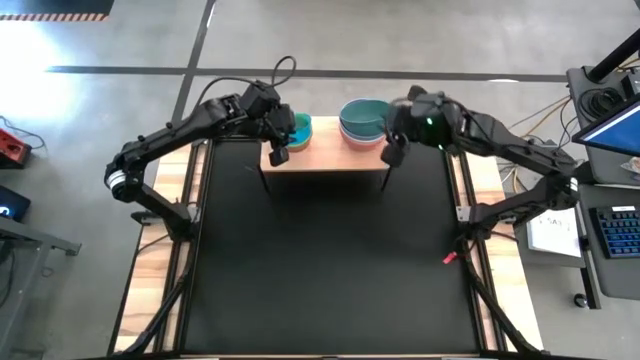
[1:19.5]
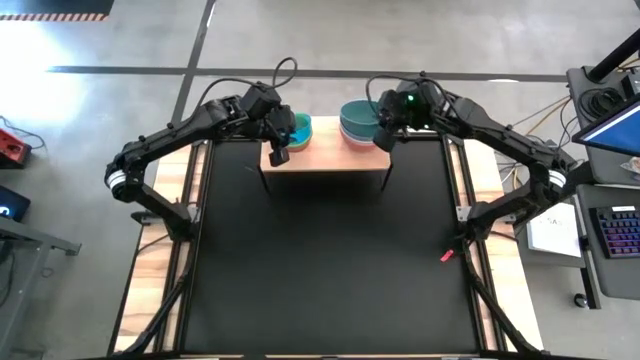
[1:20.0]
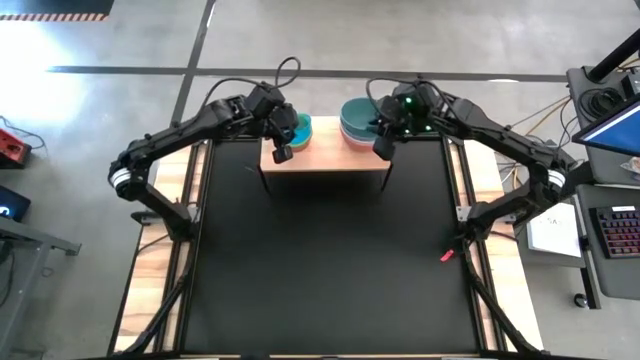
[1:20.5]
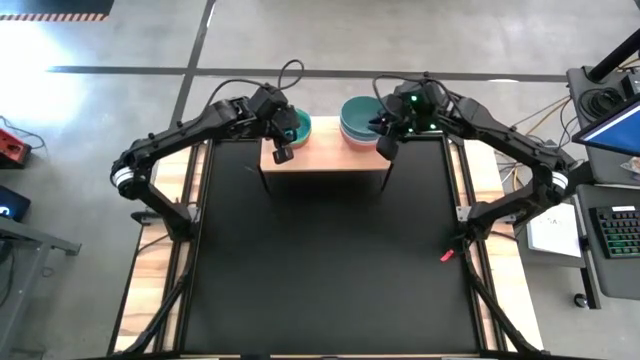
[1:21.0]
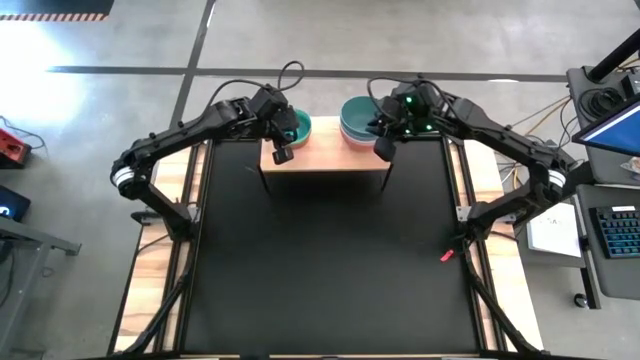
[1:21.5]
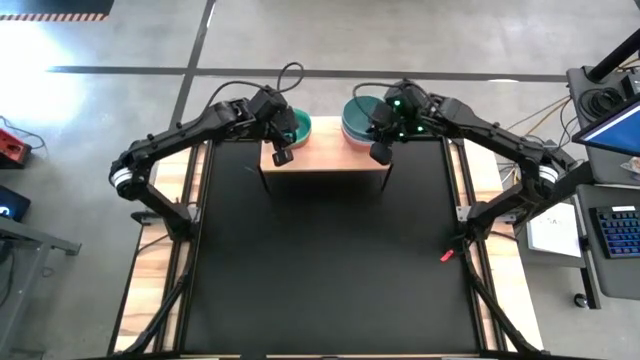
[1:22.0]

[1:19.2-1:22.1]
Task: Place and stack bowls onto a shelf
Adjust the green bowl on the shelf

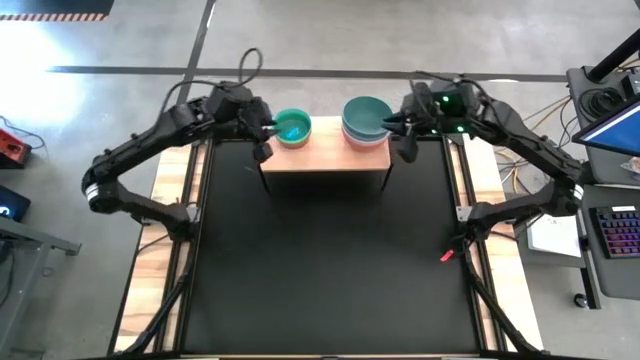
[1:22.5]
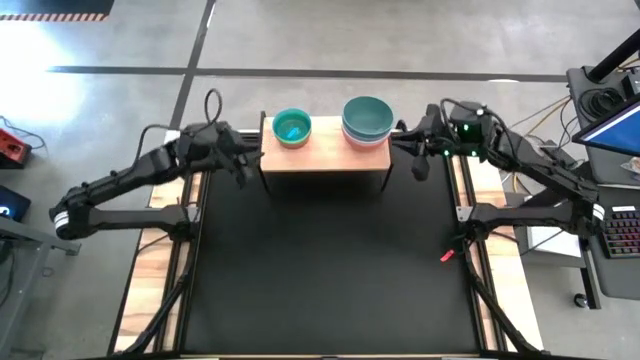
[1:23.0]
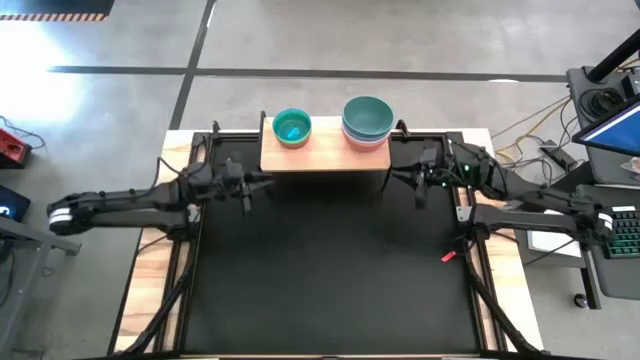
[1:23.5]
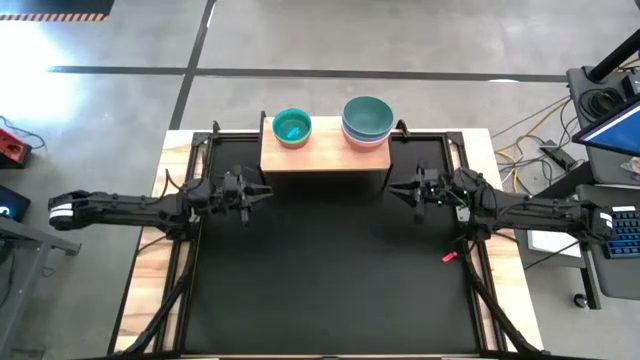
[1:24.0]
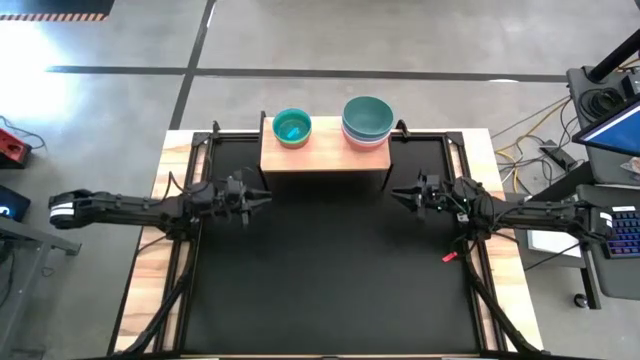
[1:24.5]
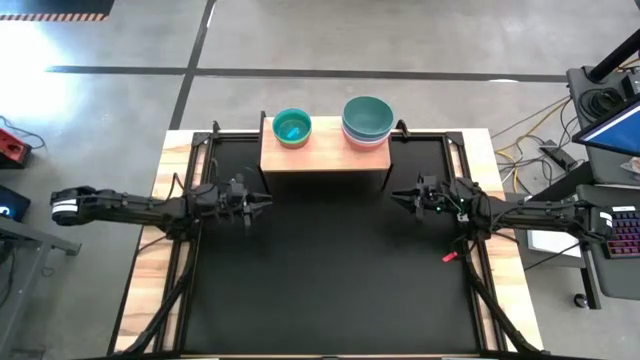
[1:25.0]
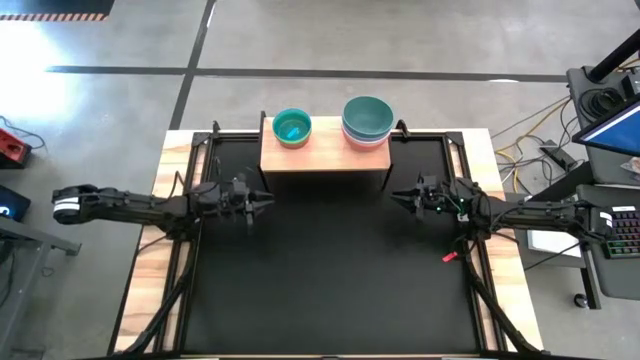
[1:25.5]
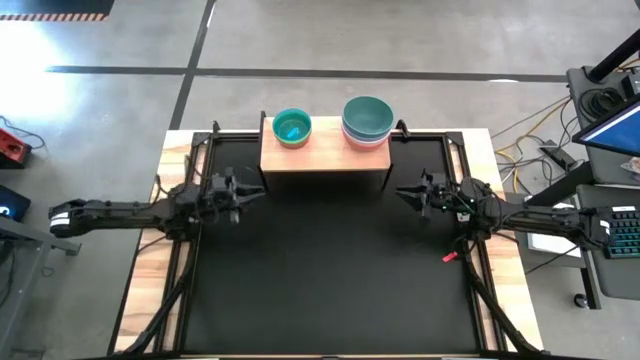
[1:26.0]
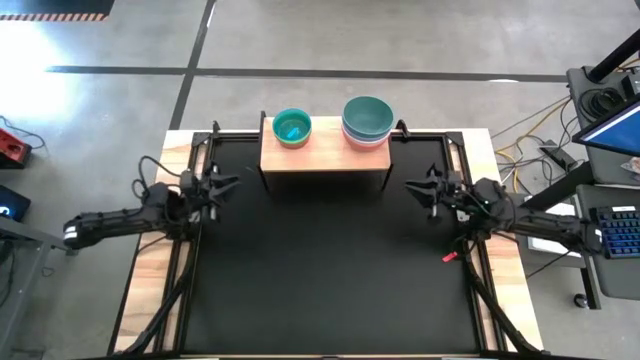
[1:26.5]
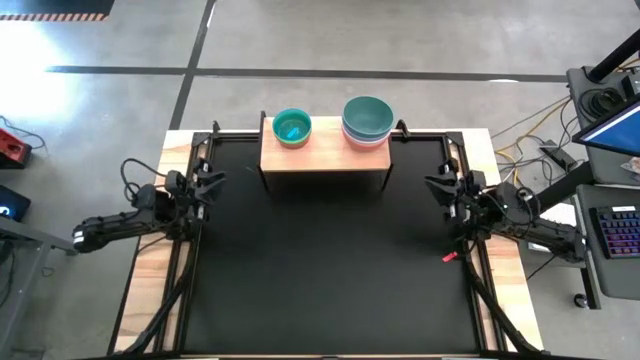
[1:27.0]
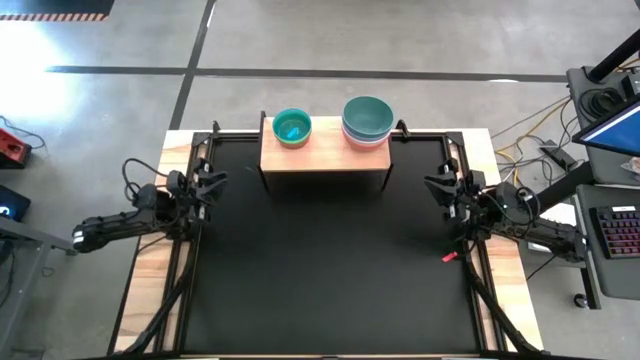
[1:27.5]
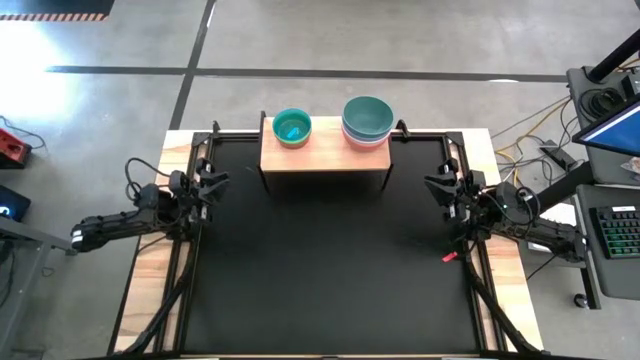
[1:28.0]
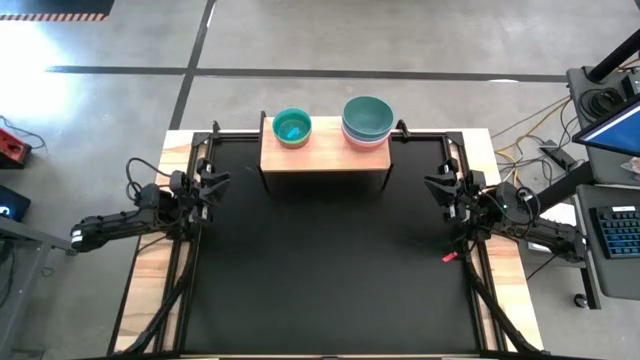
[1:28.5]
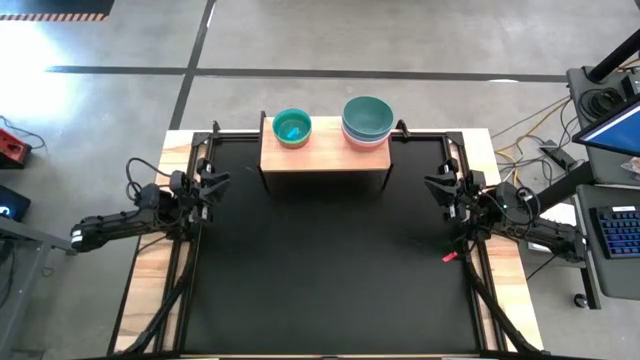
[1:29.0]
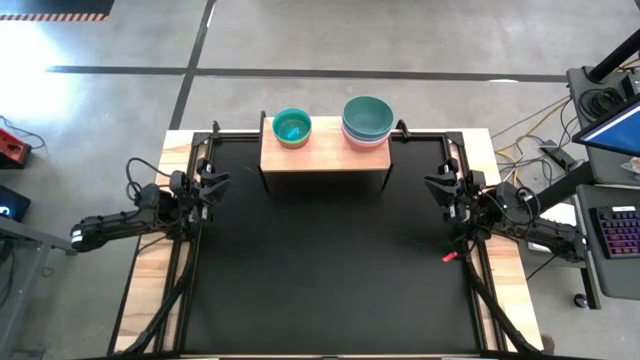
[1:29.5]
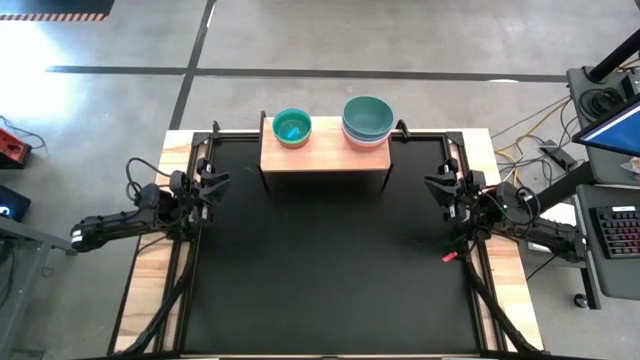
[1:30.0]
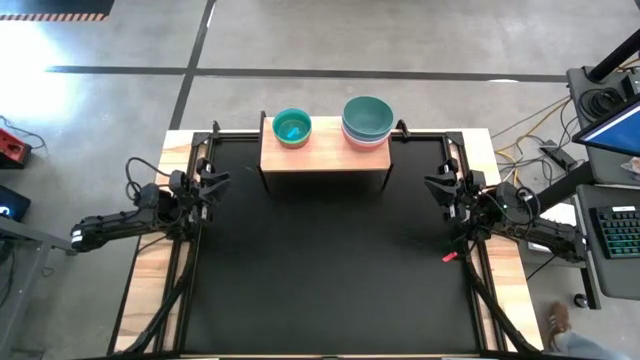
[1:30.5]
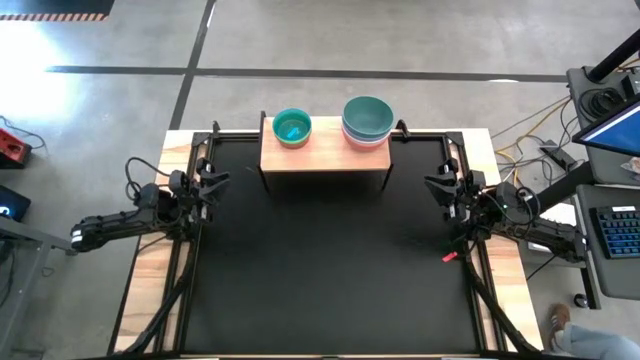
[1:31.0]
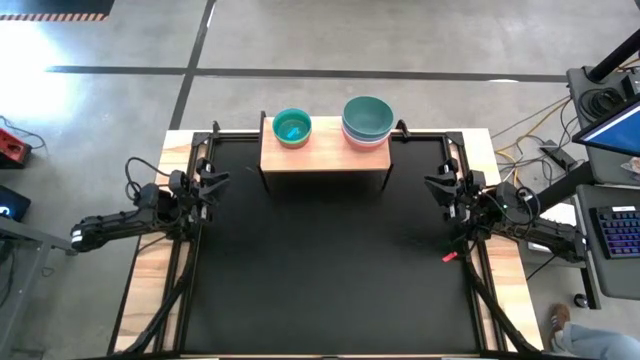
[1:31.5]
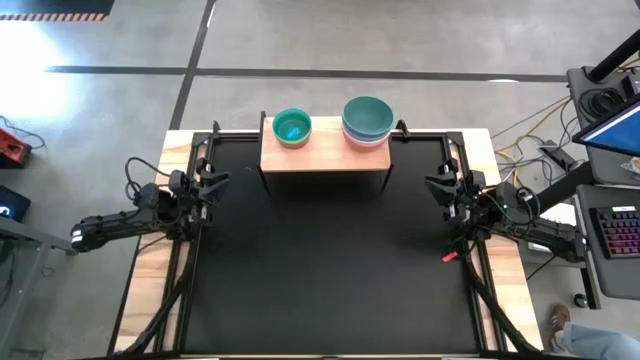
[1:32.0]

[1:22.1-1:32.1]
Return to Home Position

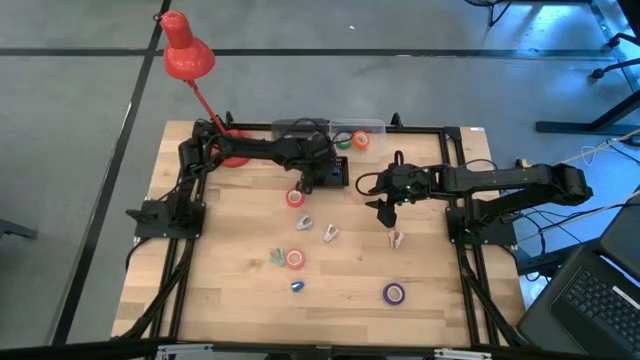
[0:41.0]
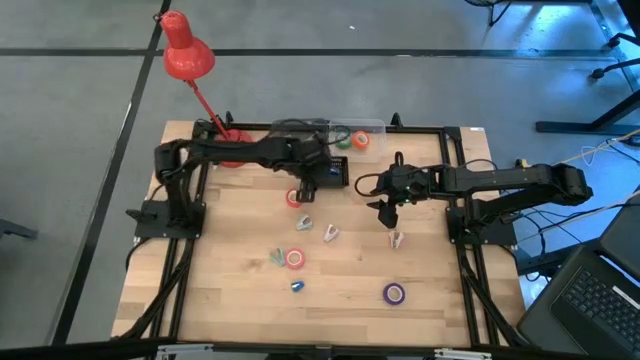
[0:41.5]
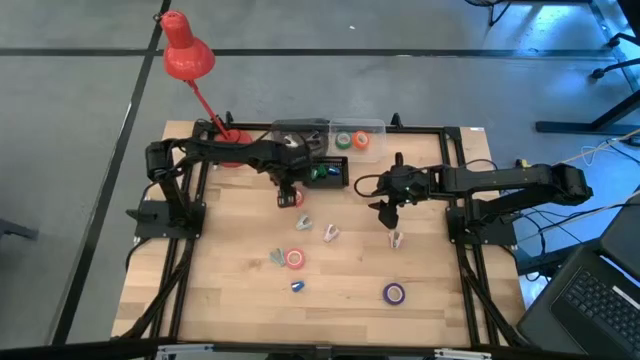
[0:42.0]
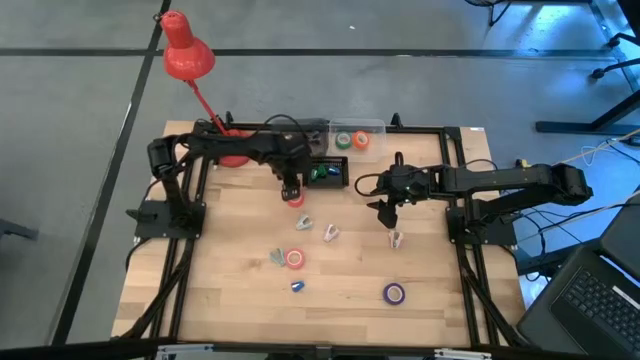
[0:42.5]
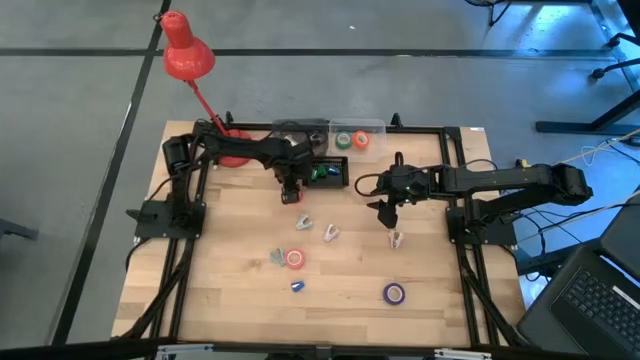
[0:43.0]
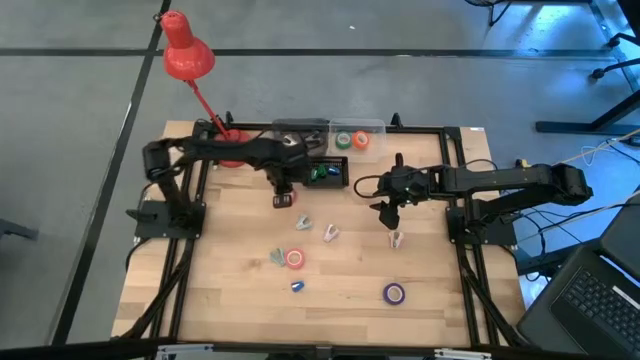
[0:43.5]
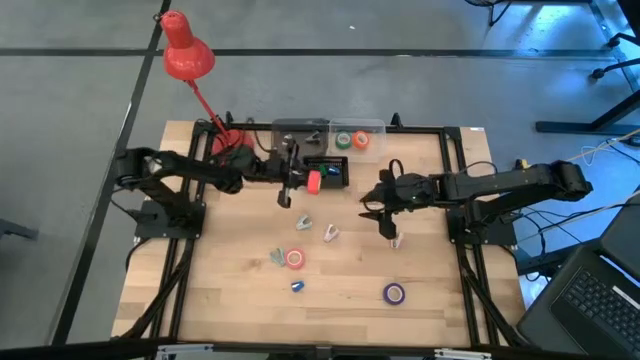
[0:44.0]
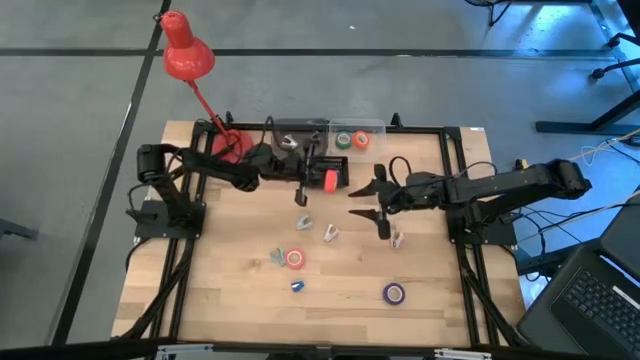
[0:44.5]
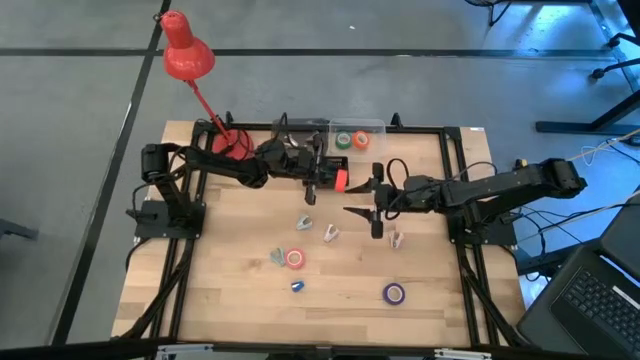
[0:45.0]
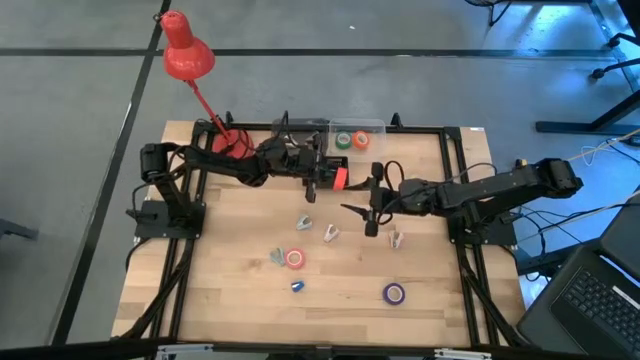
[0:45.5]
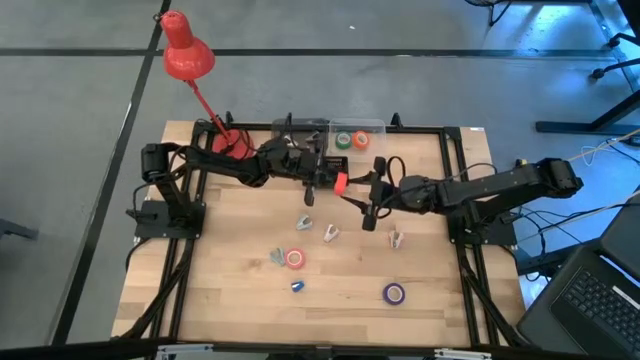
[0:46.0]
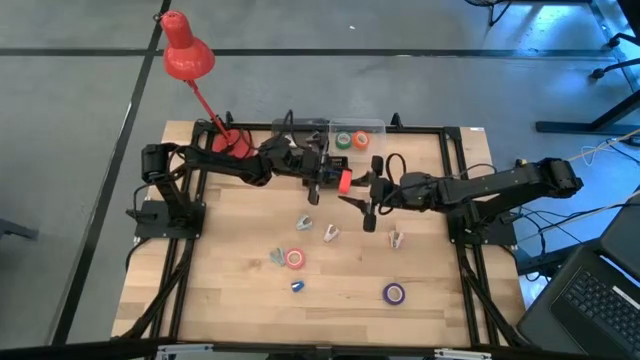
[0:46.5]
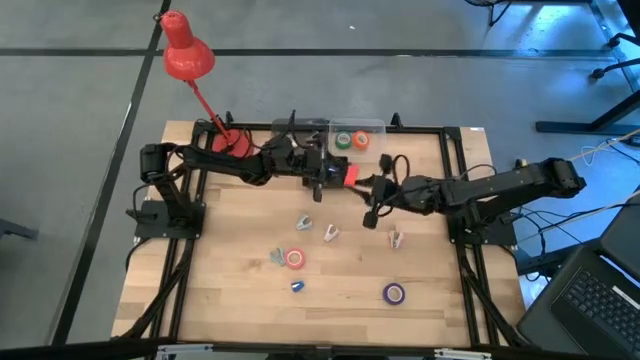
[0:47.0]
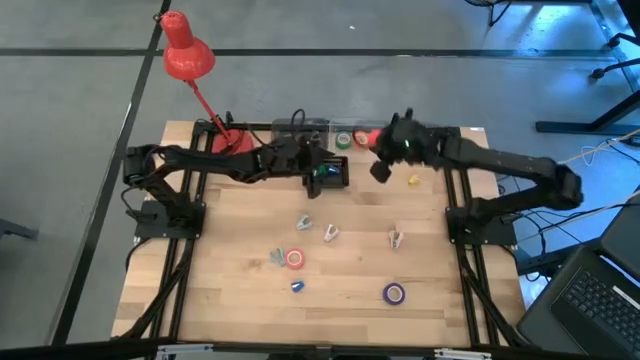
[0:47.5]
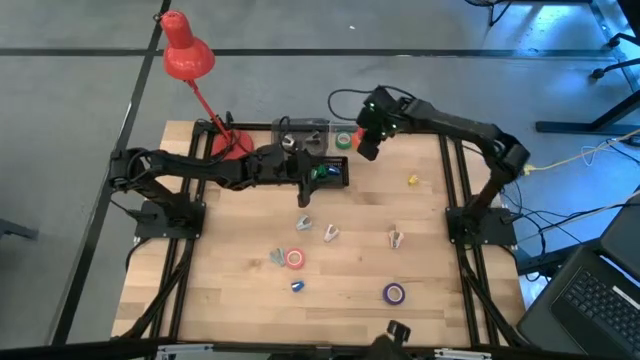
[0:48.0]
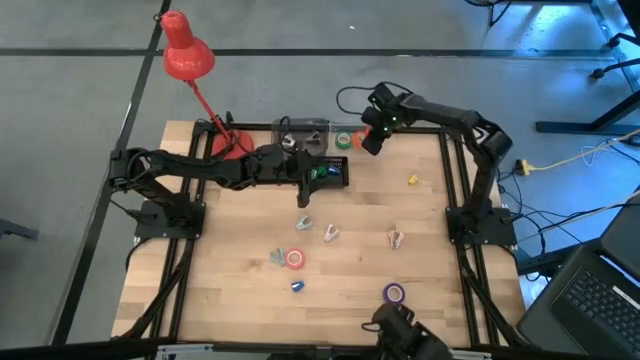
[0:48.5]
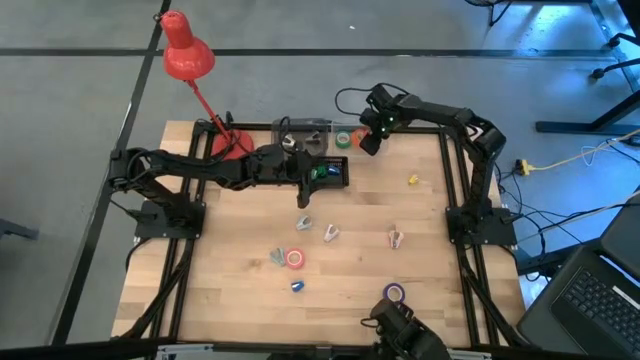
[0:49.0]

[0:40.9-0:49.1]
Task: Pick and place Stapler, Stapler remover, tape
Put the red tape into the transparent bin
